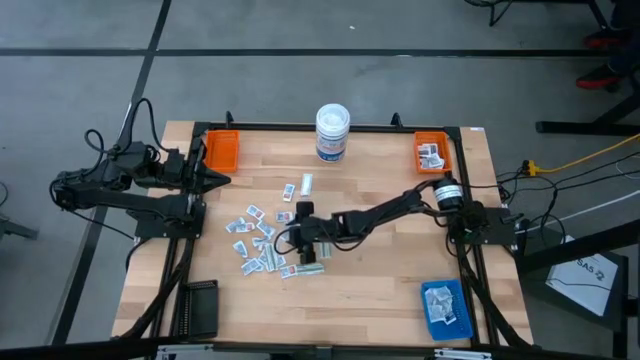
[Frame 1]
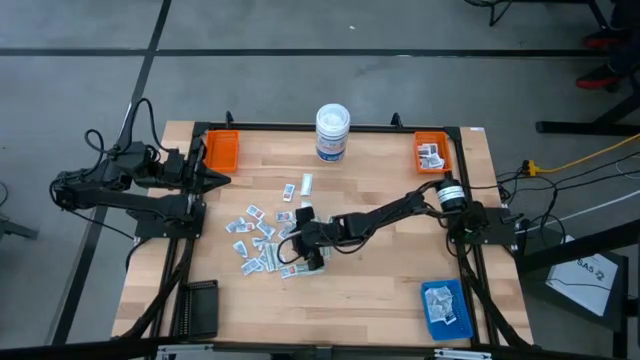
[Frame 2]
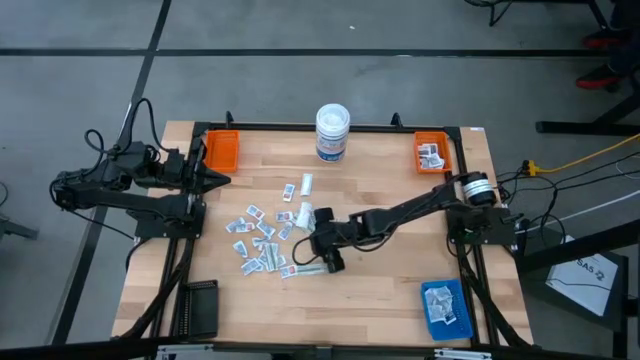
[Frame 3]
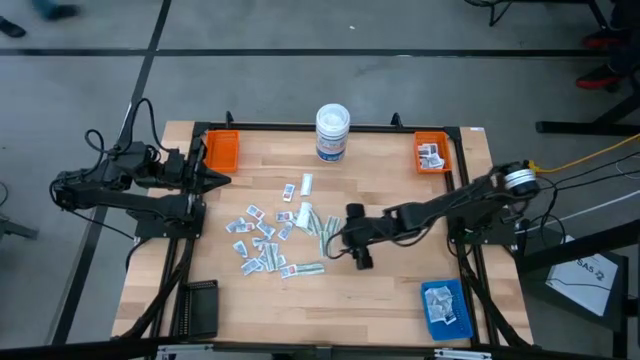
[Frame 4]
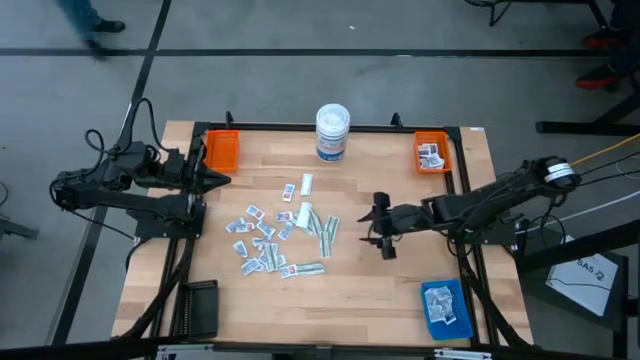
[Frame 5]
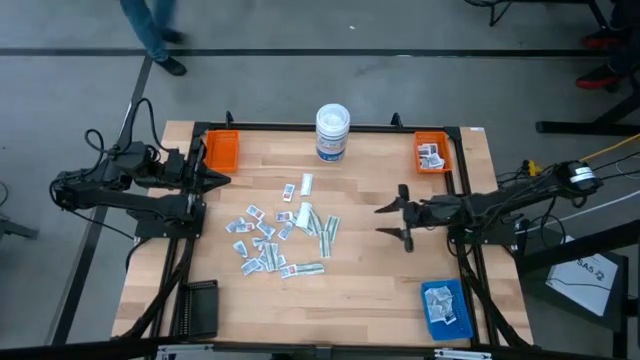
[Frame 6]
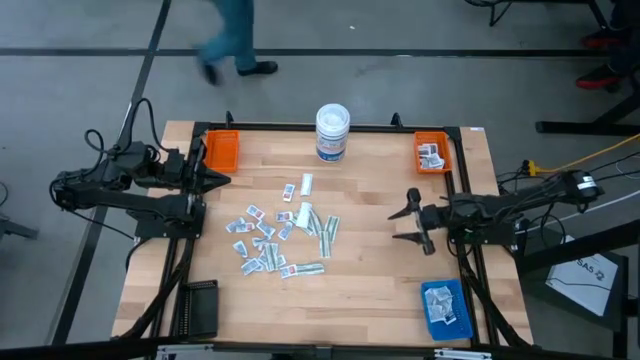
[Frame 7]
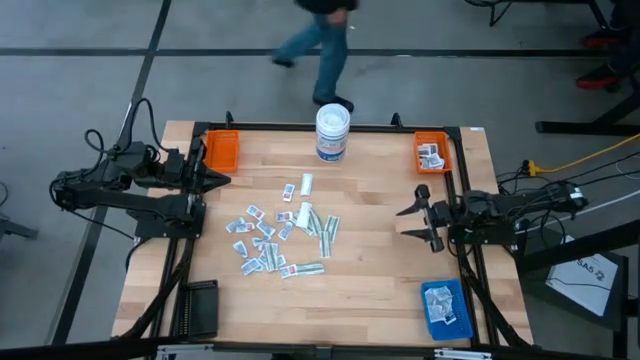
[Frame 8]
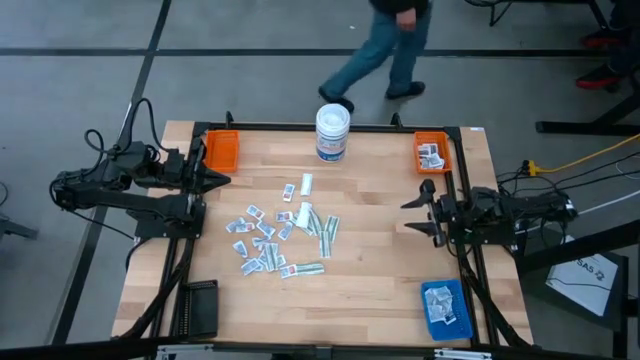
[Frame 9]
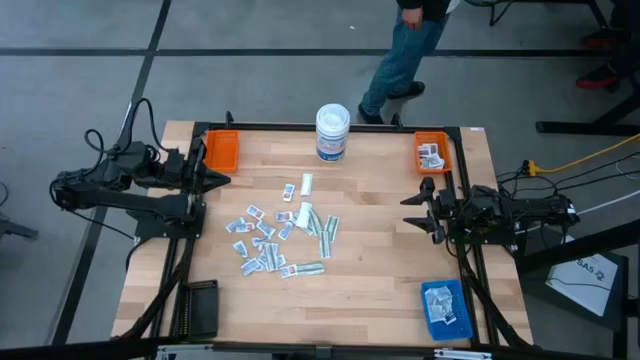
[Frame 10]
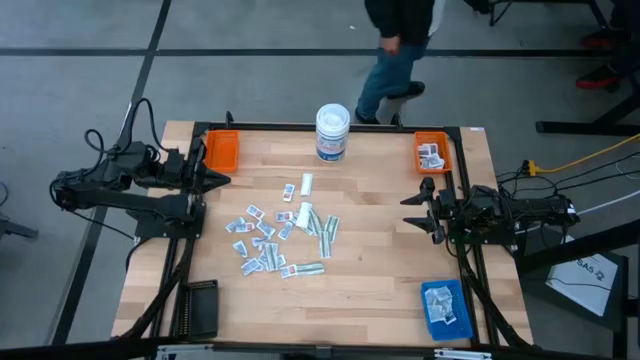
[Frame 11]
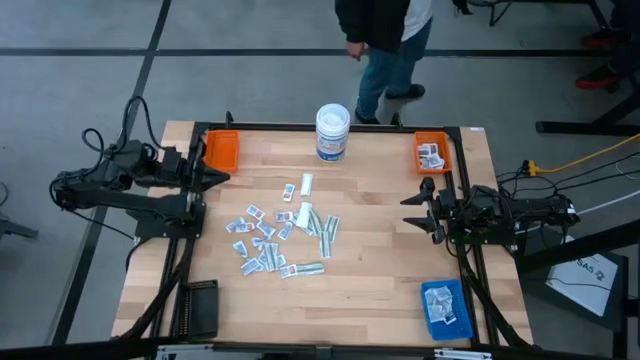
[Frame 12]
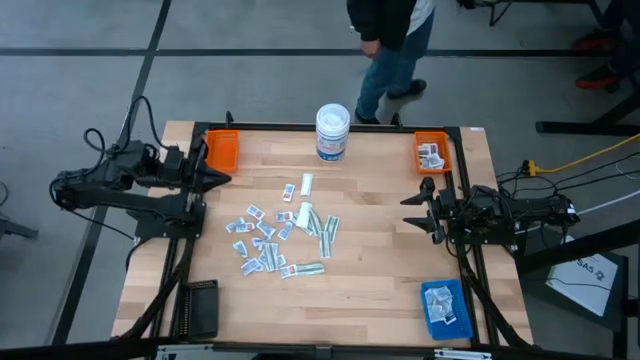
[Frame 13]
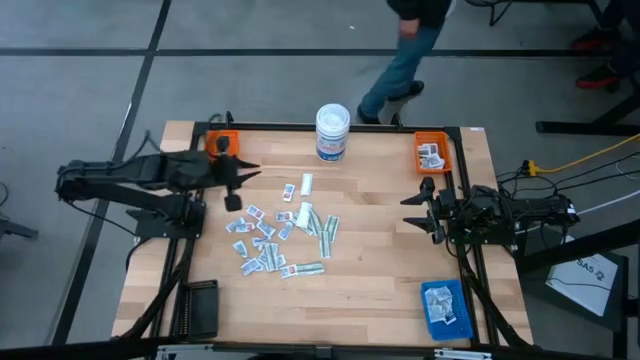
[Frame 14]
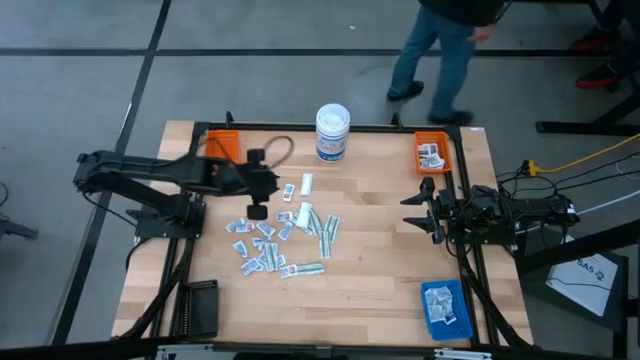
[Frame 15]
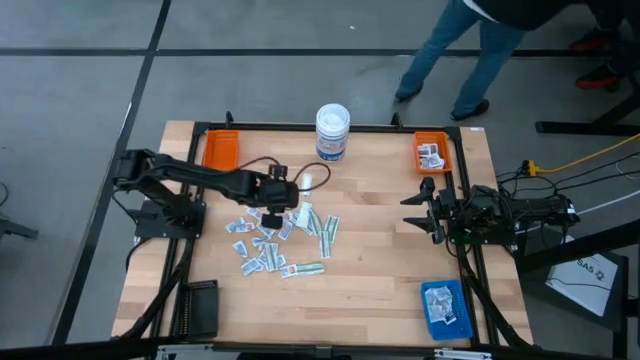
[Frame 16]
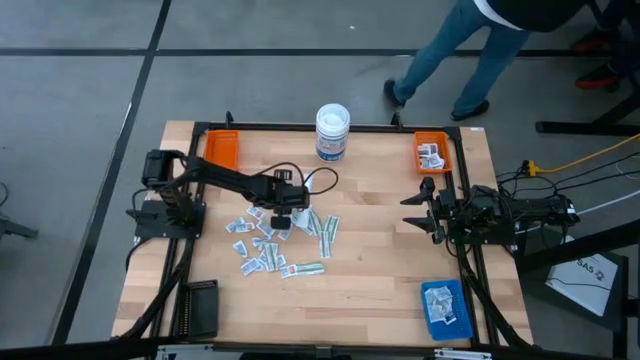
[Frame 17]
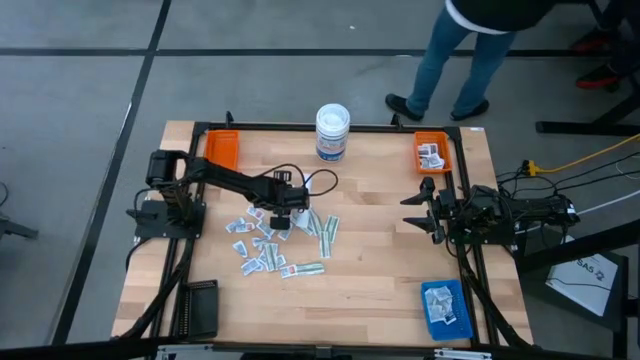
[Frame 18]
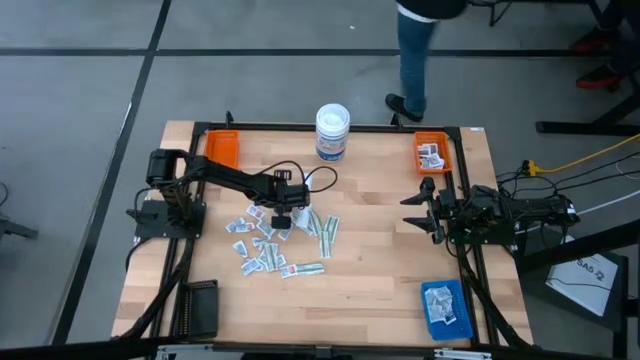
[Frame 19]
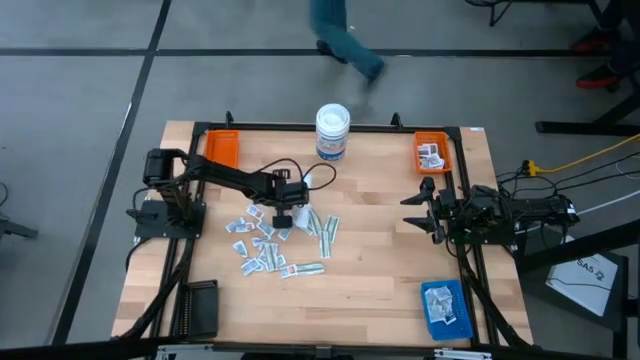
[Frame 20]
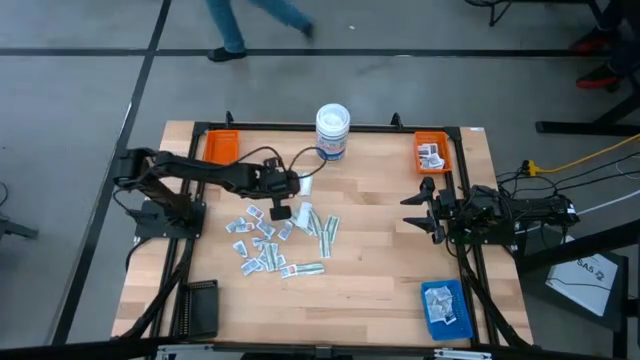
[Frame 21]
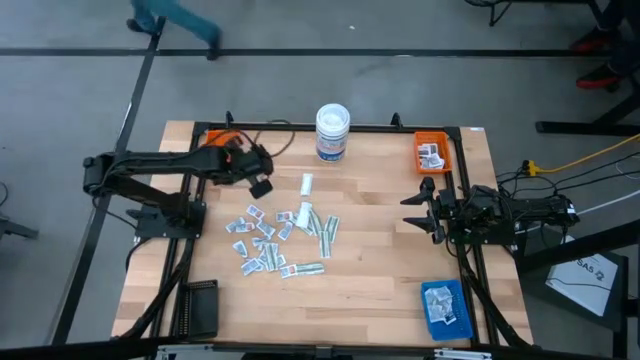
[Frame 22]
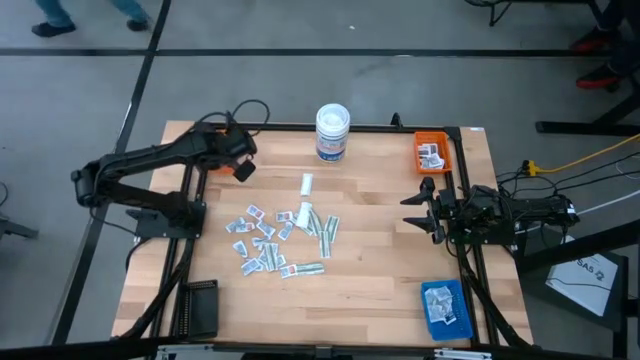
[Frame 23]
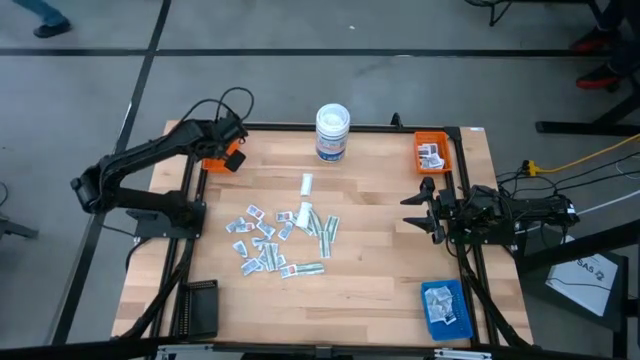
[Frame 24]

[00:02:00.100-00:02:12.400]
Task: Pick & Place First Aid Supplies
Put the orange ointment pack into the left orange bin

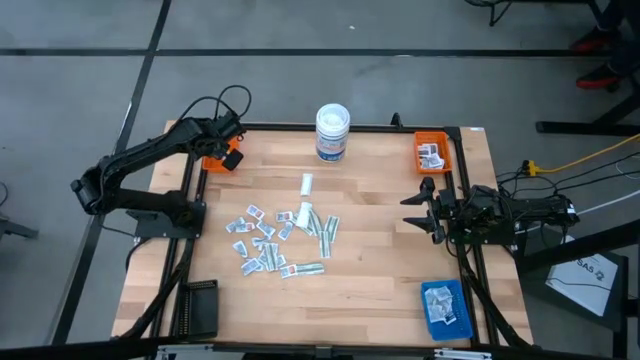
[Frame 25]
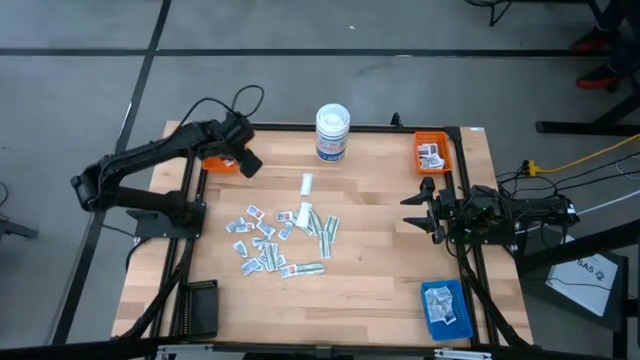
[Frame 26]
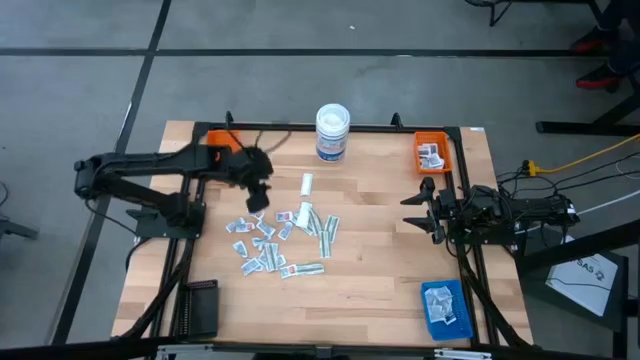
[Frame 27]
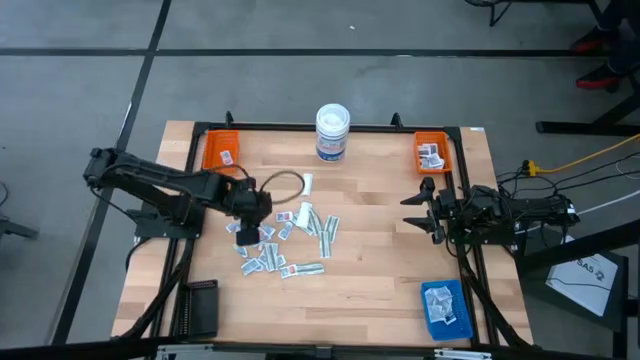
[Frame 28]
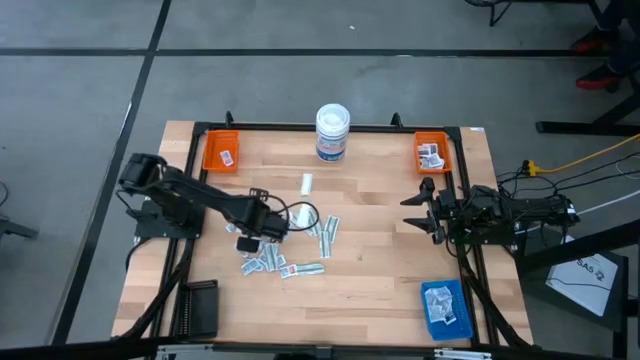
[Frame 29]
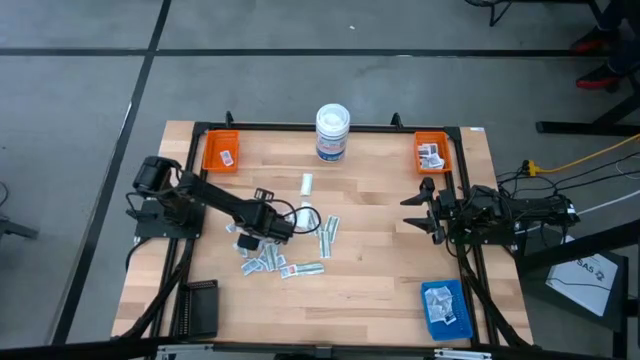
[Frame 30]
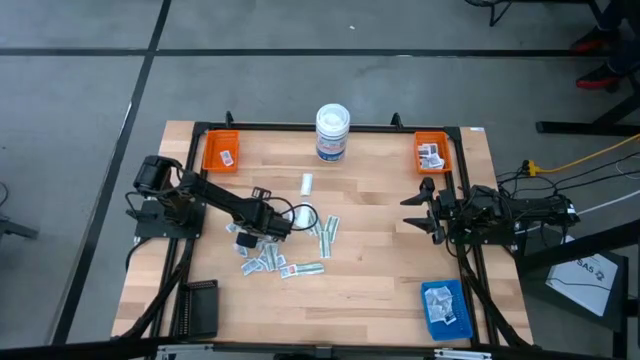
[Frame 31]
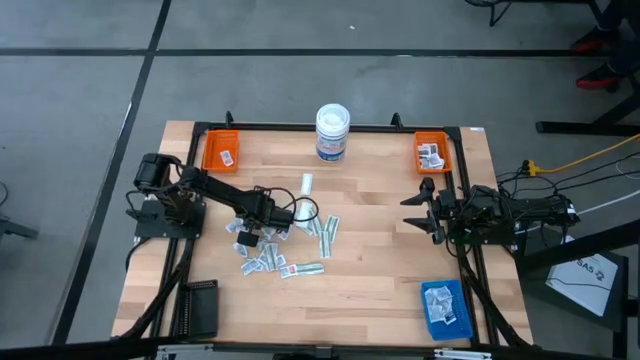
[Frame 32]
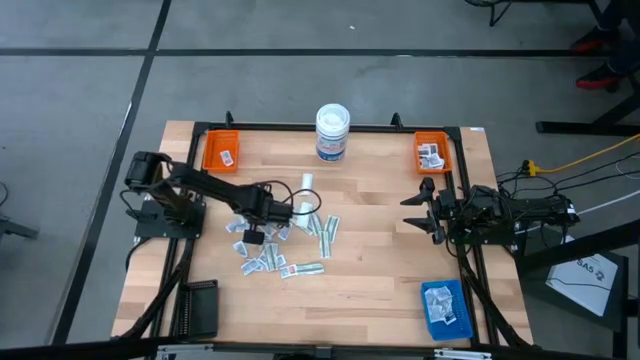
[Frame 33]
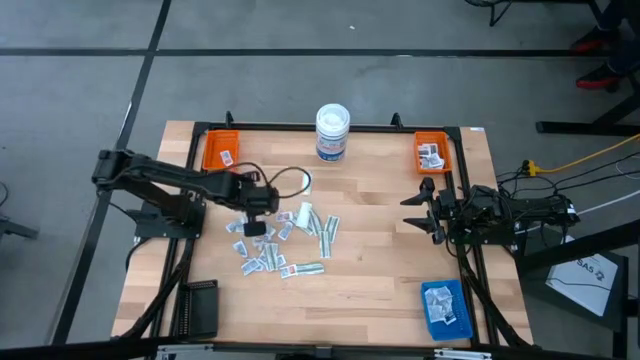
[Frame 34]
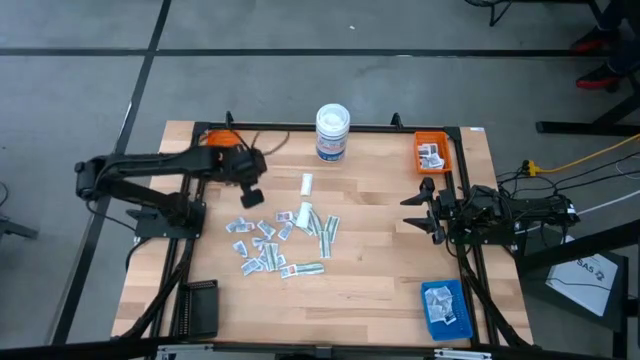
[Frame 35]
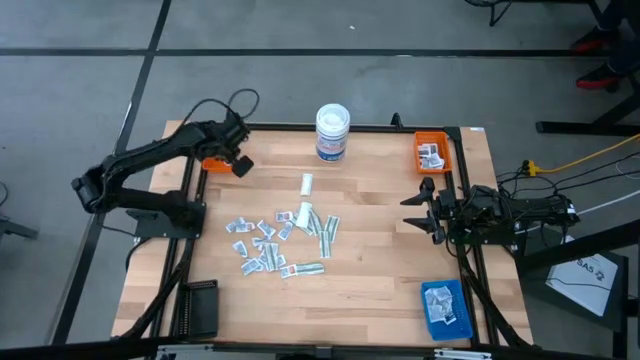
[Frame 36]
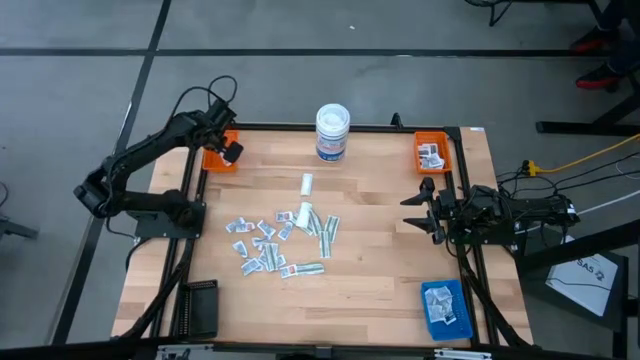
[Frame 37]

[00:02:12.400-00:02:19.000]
Put the orange ointment pack into the left orange bin

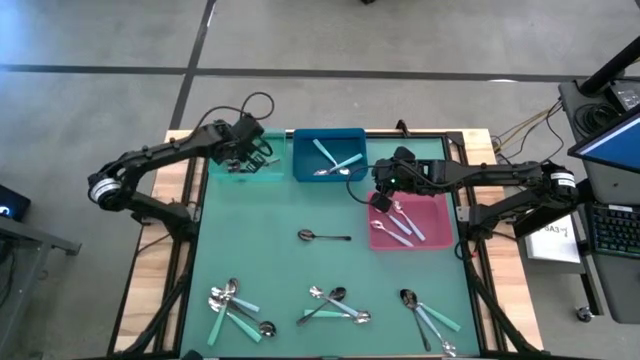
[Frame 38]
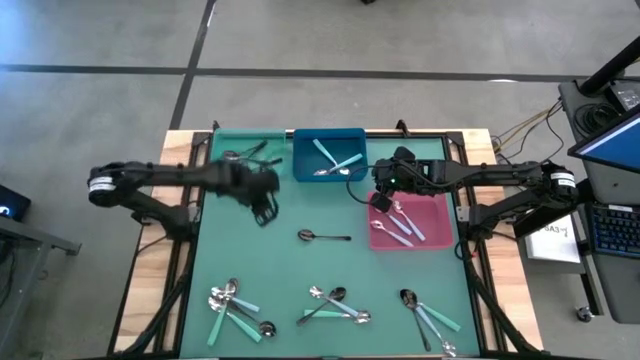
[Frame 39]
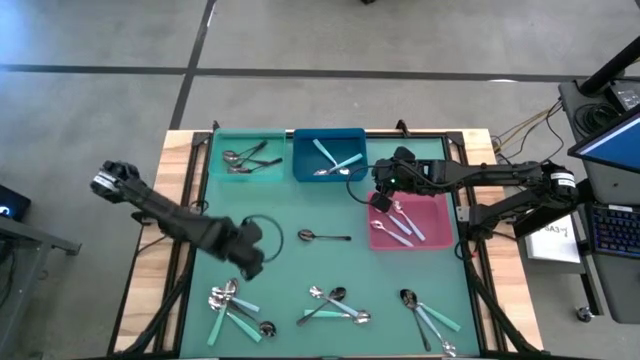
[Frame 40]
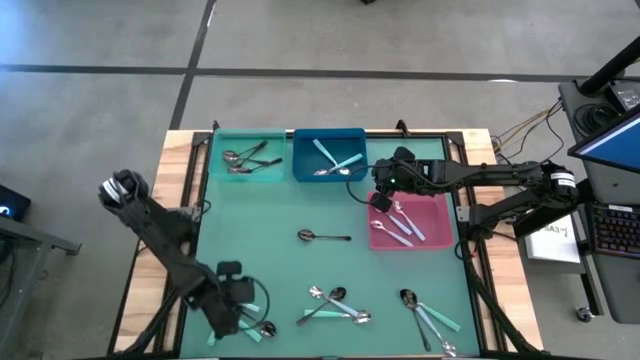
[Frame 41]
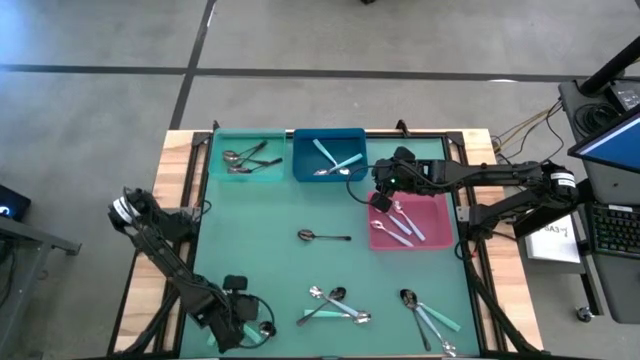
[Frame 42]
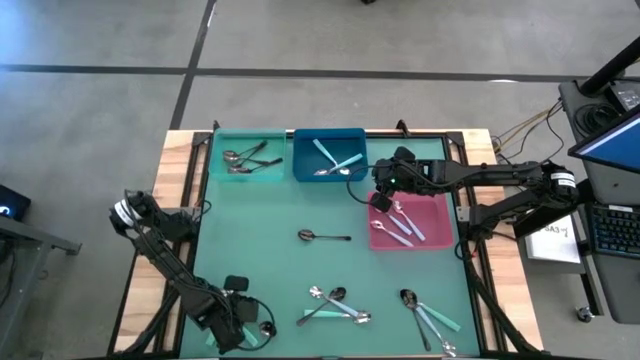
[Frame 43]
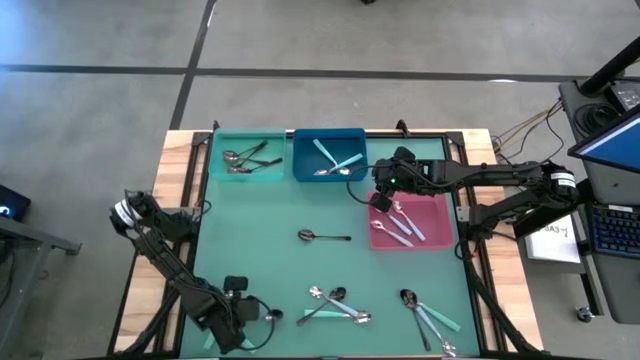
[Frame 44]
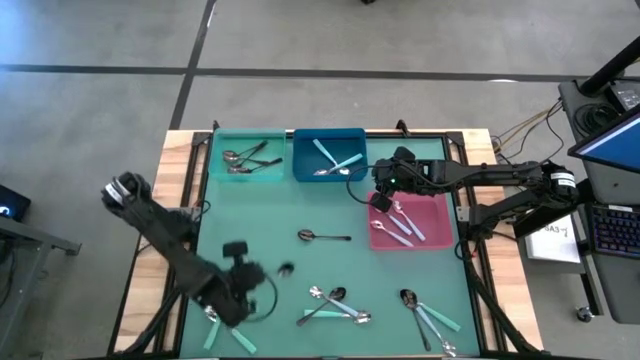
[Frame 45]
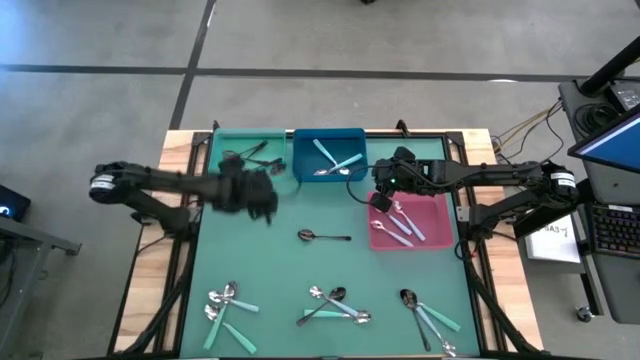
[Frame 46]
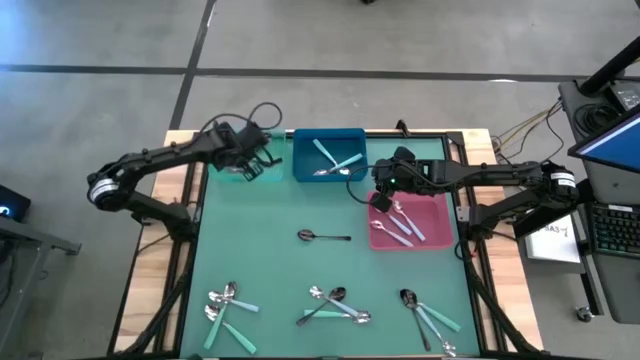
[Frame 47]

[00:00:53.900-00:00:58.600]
Task: Sort silverware by color (type)
Put the black spoon into the green bin
